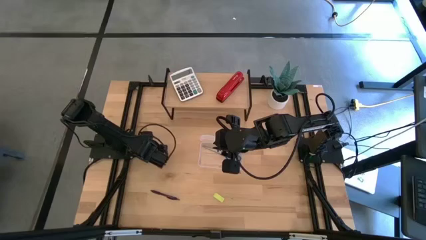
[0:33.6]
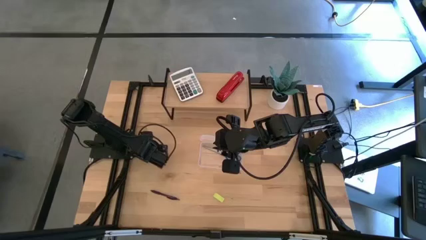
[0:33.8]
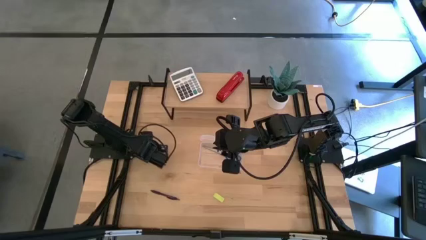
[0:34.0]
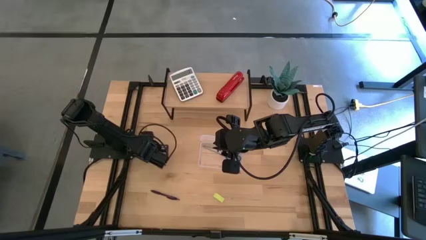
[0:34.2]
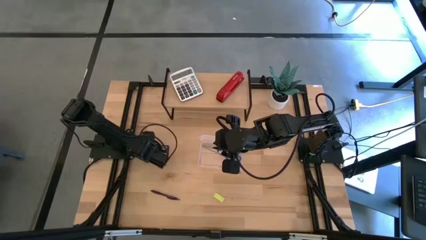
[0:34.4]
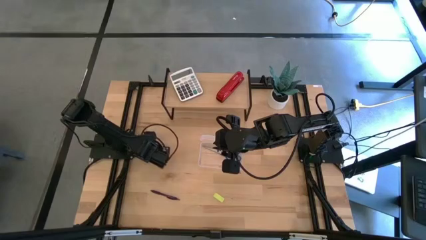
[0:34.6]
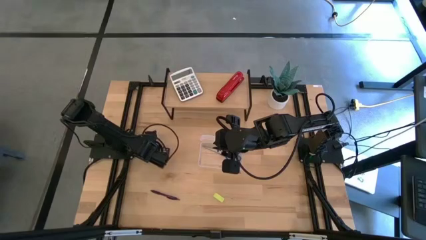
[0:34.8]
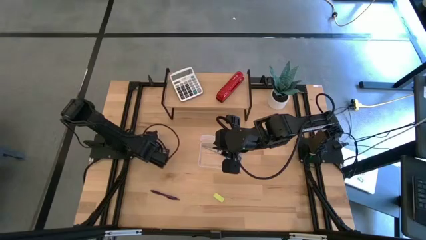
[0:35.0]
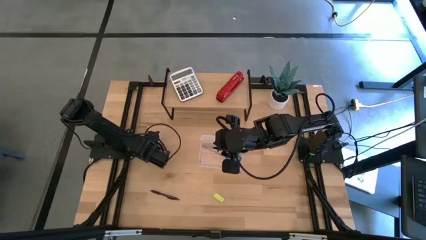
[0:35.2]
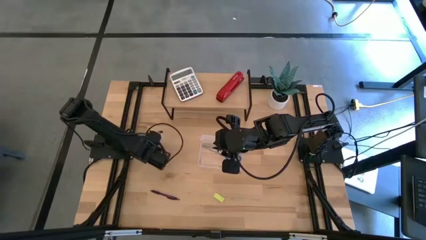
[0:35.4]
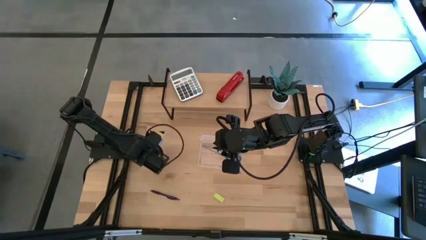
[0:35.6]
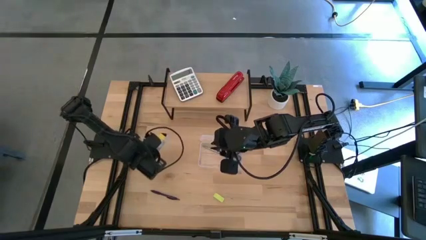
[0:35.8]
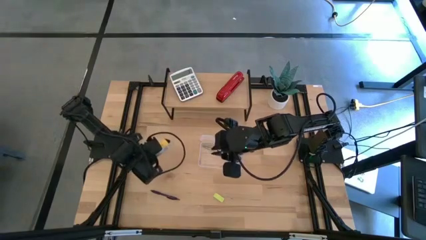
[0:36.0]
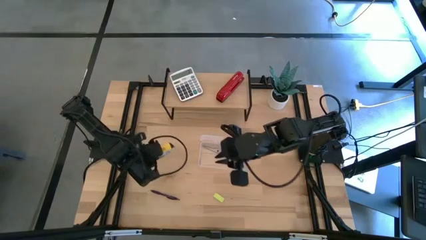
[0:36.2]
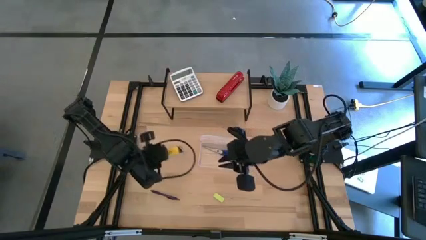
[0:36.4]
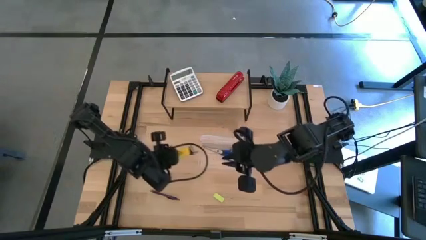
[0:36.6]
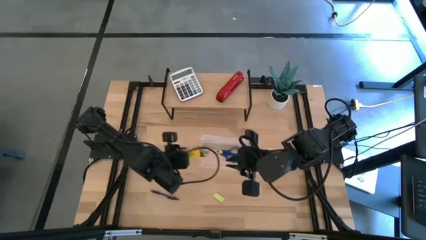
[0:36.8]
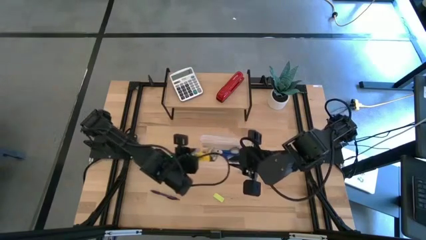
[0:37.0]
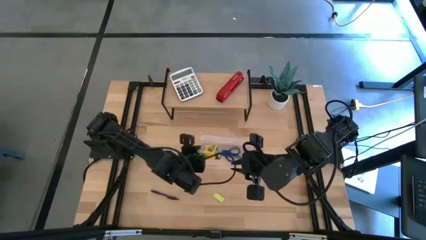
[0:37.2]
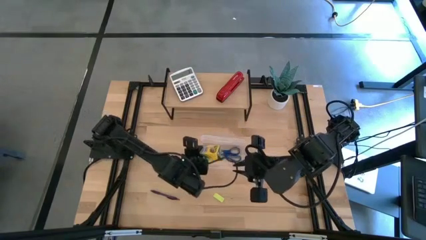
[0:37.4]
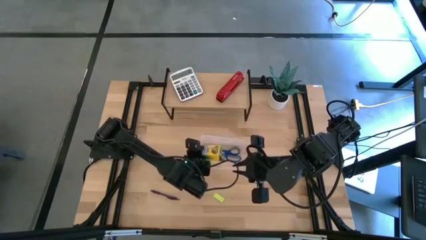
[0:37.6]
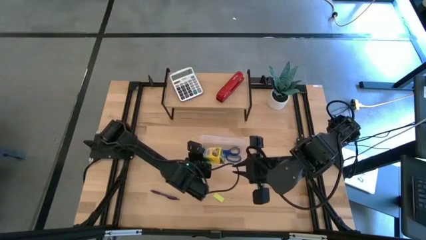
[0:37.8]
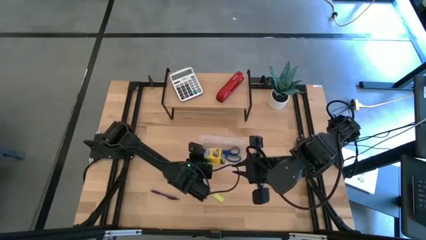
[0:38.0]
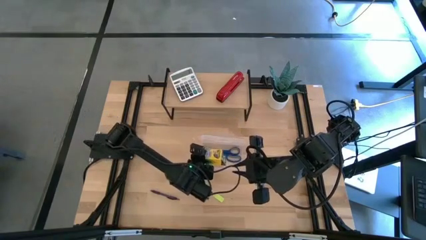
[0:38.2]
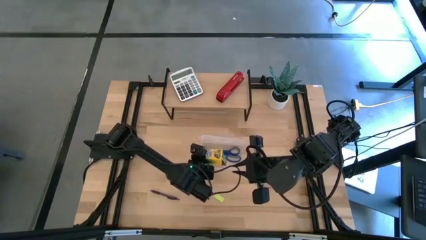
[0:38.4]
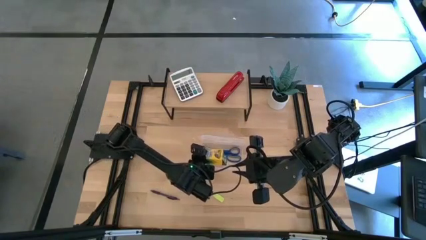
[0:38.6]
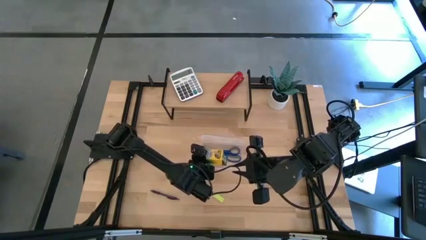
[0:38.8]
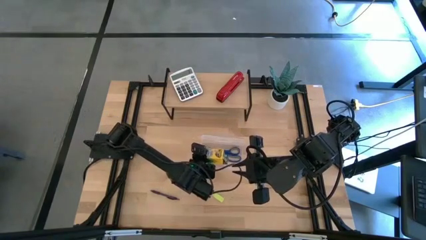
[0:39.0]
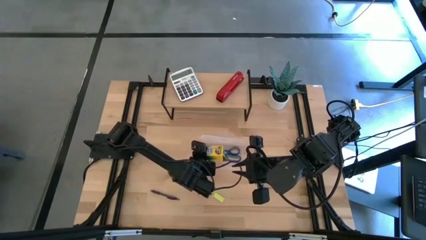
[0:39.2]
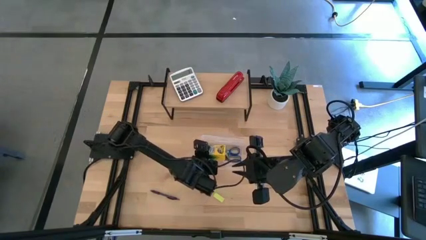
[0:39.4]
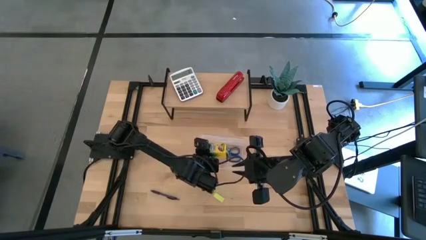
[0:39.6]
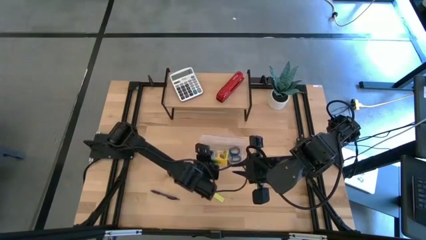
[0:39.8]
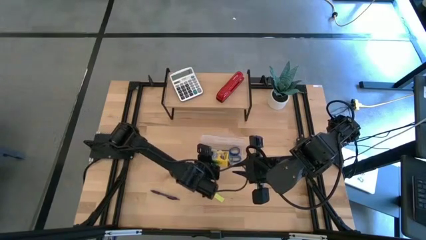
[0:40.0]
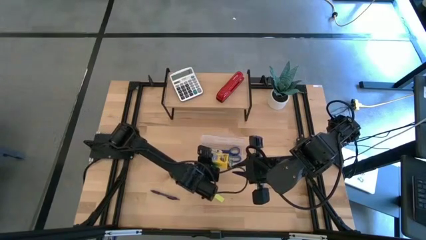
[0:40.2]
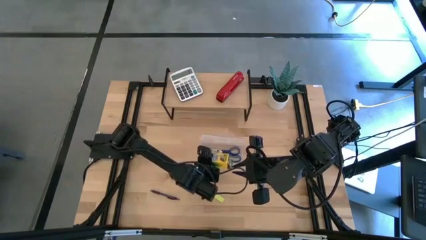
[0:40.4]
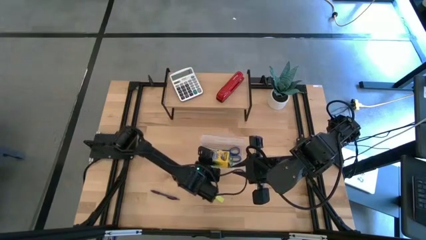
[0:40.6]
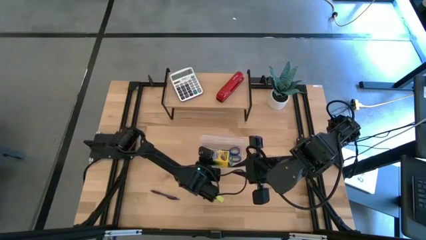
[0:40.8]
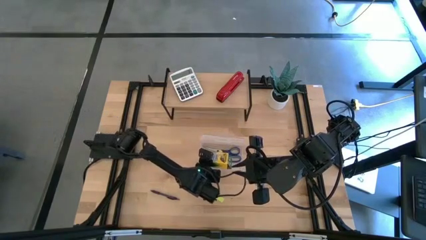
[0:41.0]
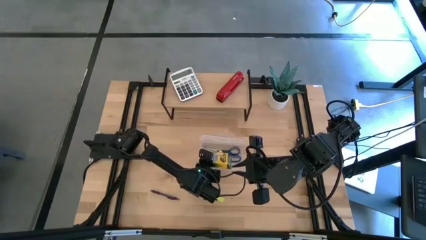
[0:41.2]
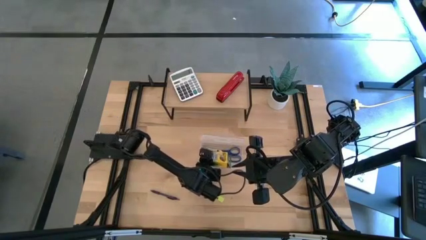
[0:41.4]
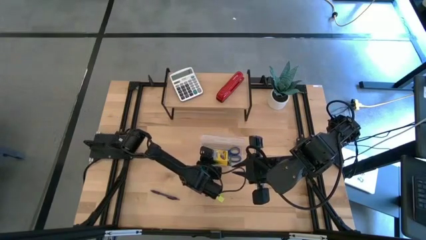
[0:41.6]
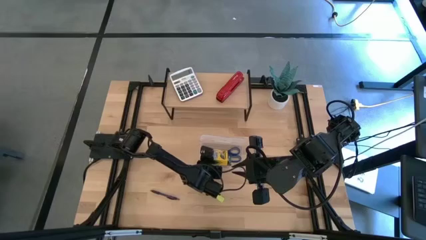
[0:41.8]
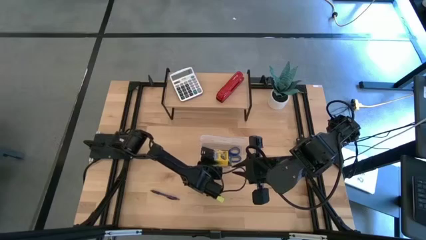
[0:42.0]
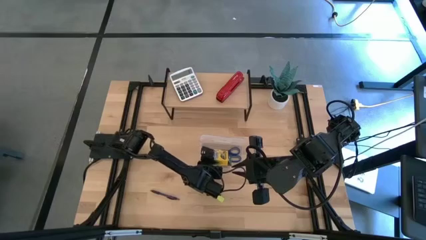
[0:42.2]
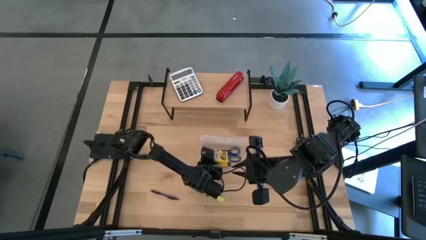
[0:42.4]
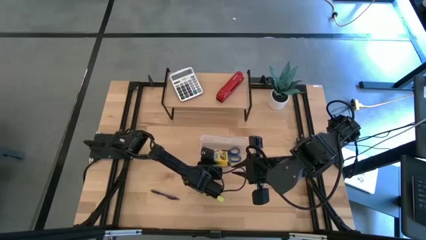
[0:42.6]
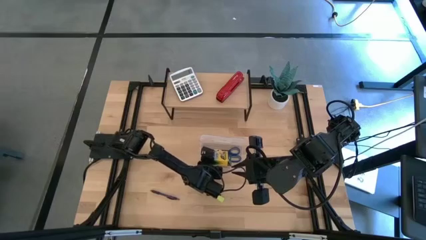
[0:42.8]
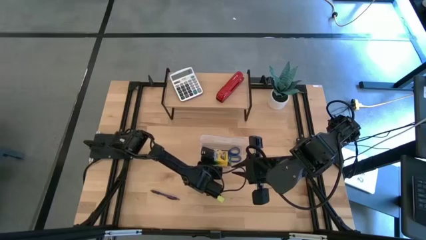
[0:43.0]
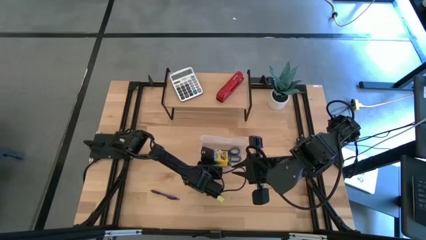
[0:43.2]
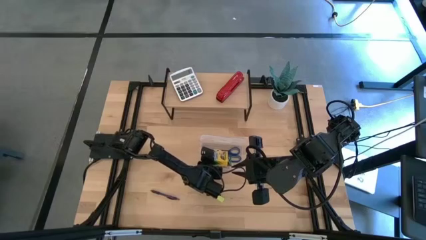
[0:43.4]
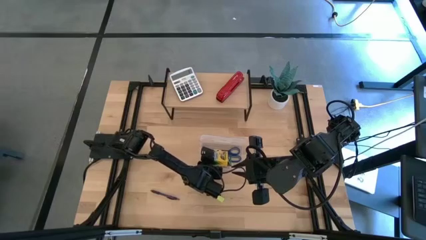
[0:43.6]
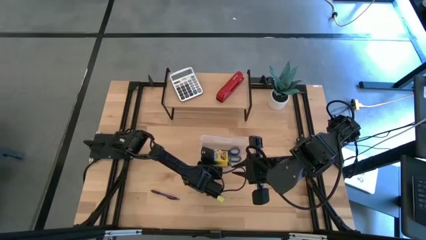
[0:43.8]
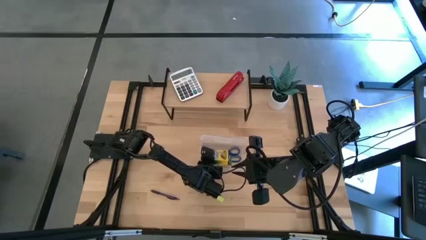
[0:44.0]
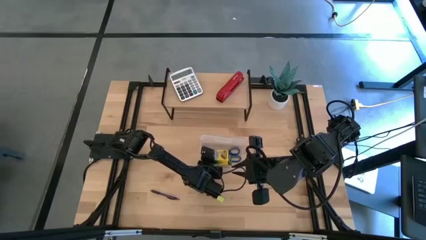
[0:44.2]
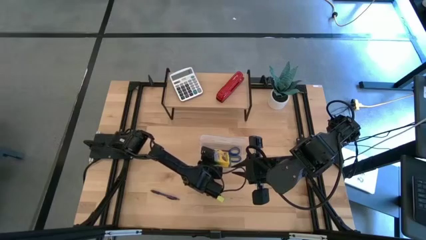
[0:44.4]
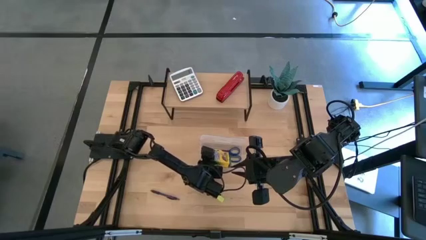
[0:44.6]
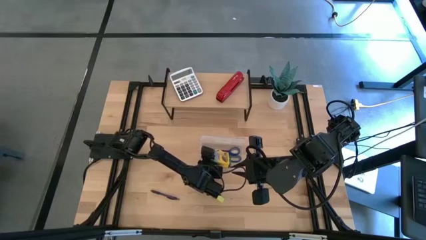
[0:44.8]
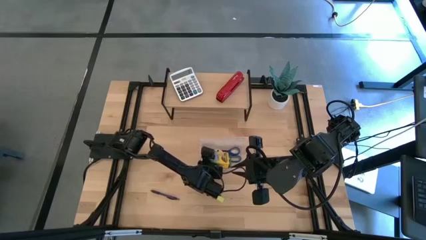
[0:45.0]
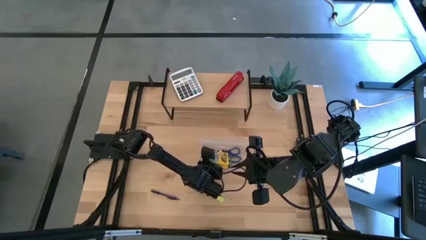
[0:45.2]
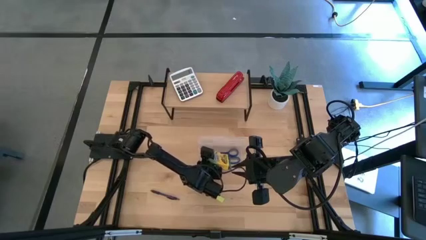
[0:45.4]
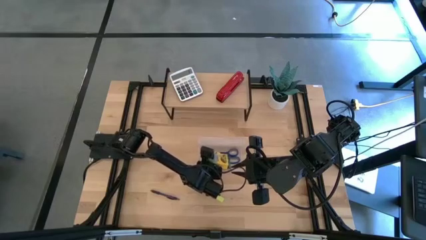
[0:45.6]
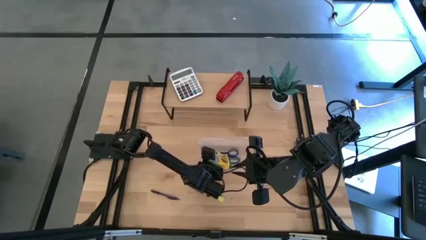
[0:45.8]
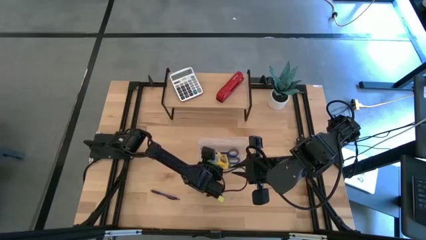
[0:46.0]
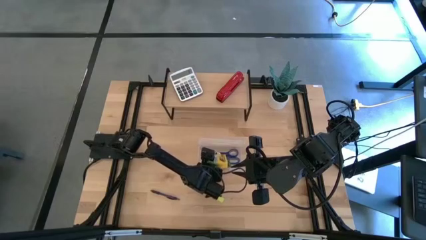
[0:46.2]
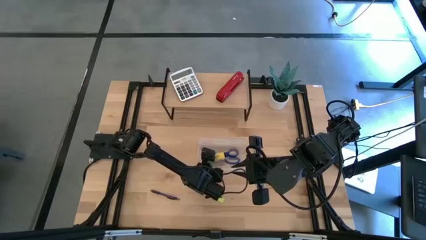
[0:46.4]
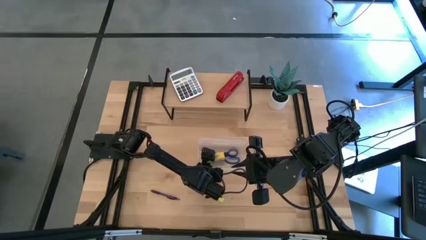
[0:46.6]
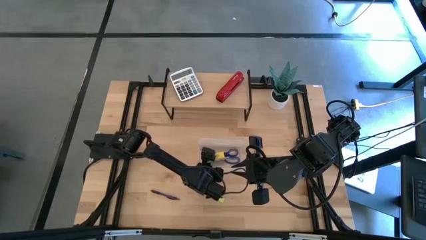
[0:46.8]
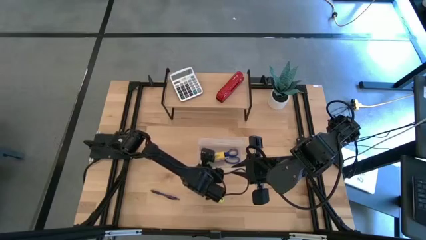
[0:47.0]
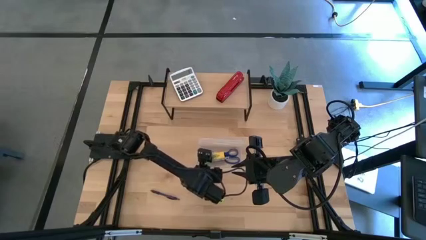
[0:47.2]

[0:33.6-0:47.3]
Task: Pack school essentials
Put the yellow crayon box into the transparent supply box
